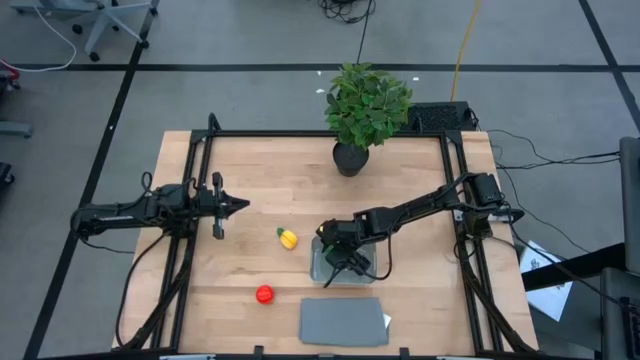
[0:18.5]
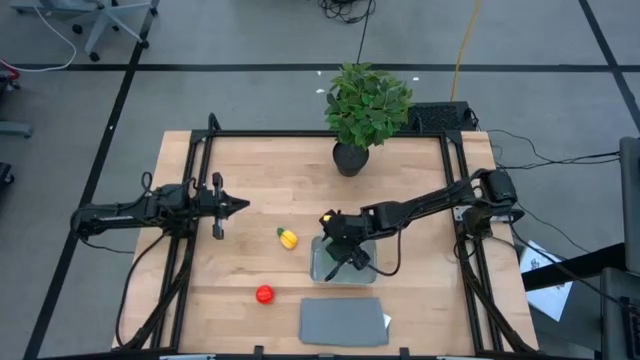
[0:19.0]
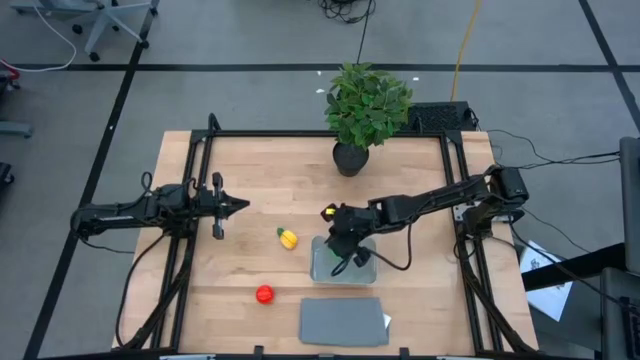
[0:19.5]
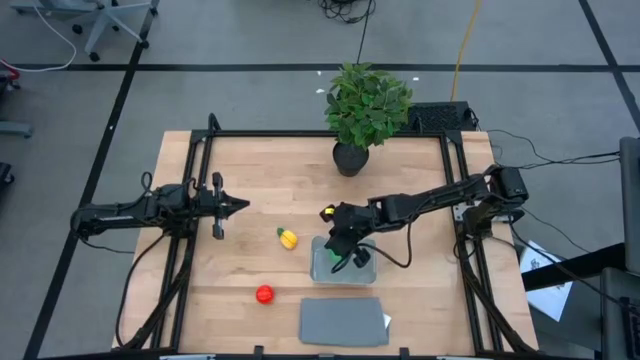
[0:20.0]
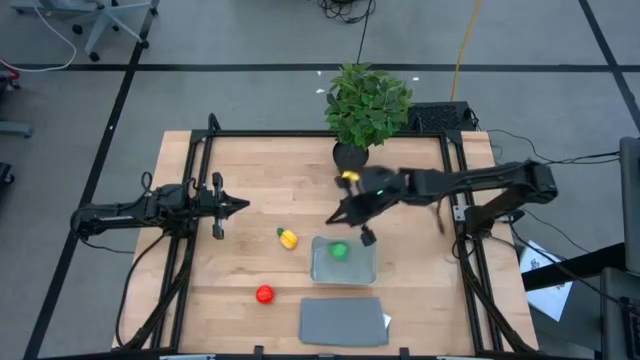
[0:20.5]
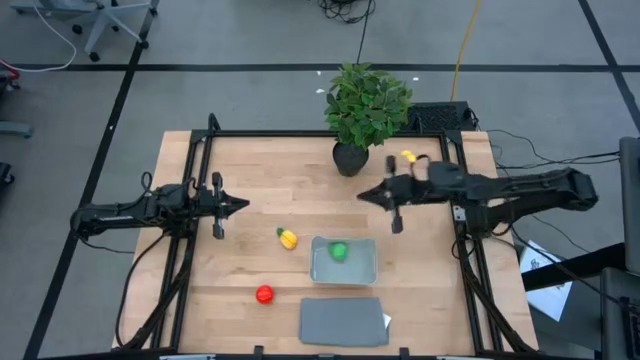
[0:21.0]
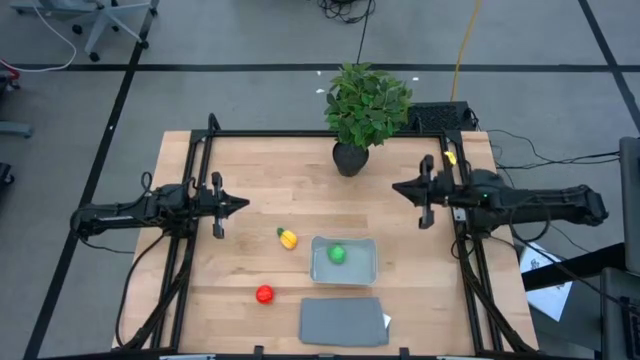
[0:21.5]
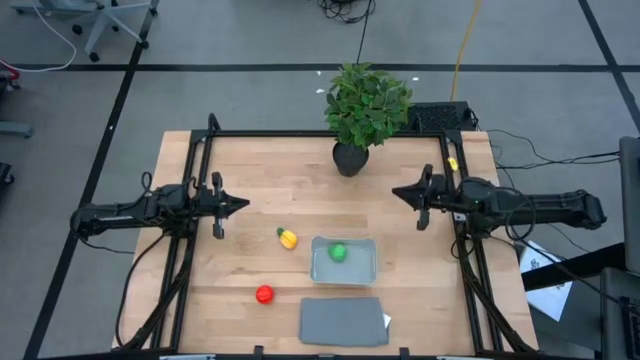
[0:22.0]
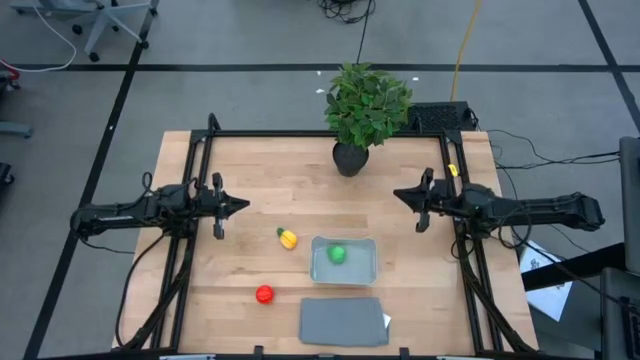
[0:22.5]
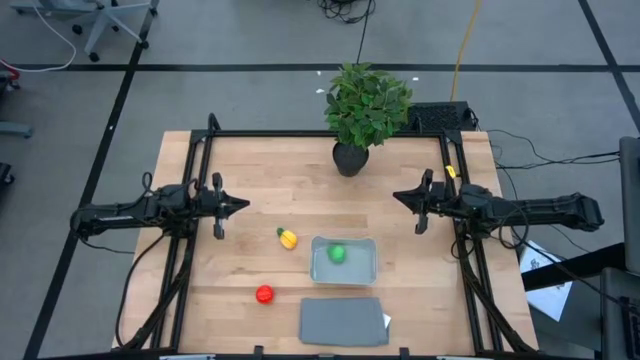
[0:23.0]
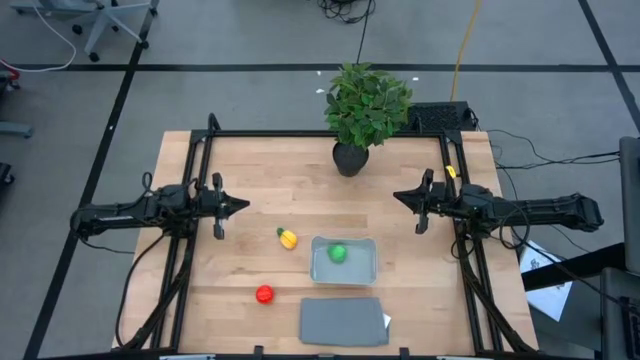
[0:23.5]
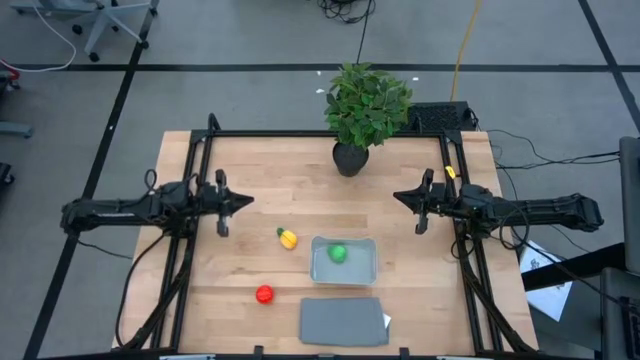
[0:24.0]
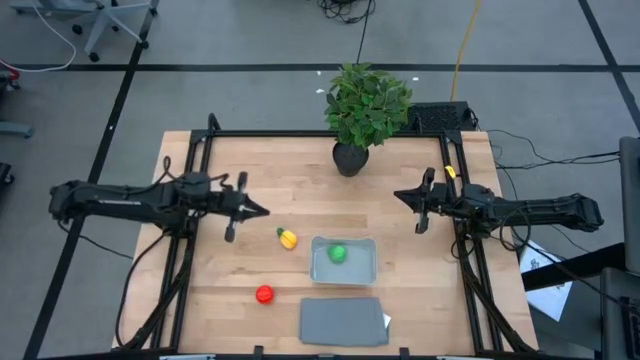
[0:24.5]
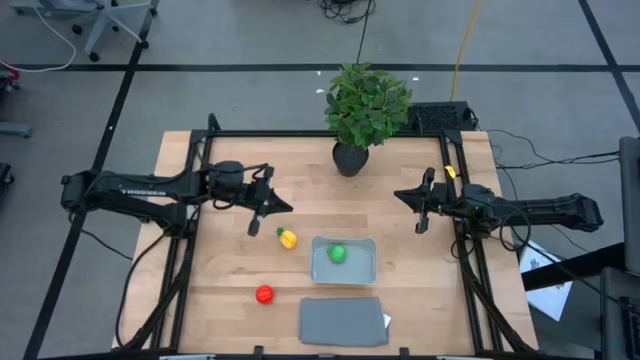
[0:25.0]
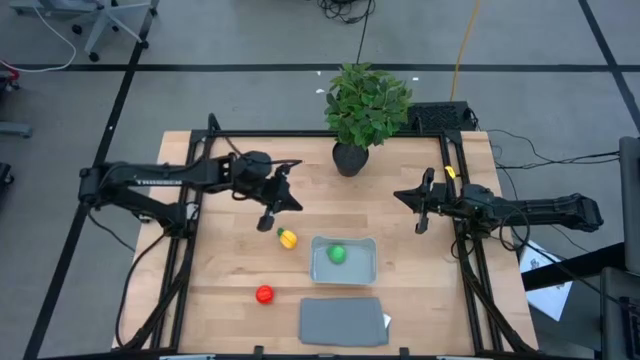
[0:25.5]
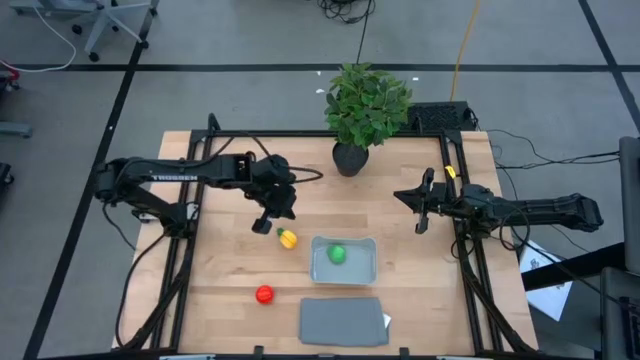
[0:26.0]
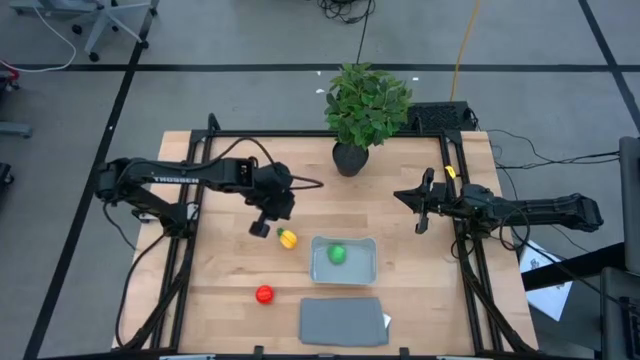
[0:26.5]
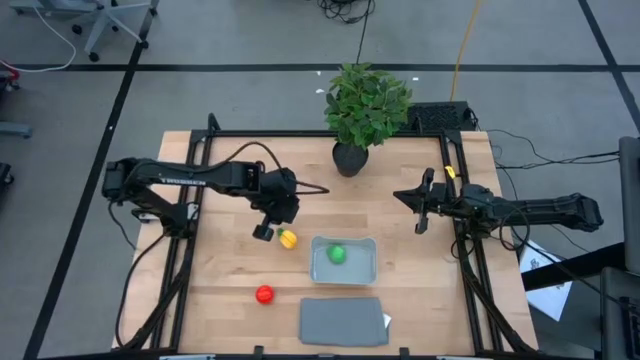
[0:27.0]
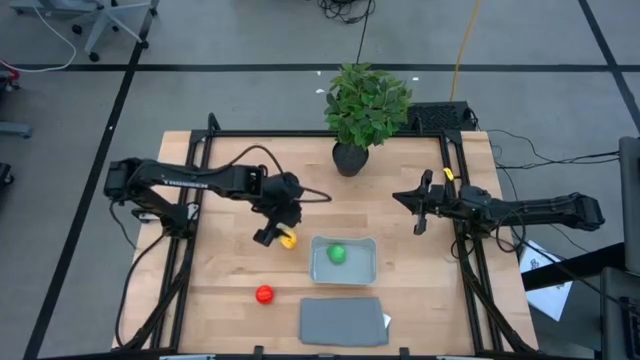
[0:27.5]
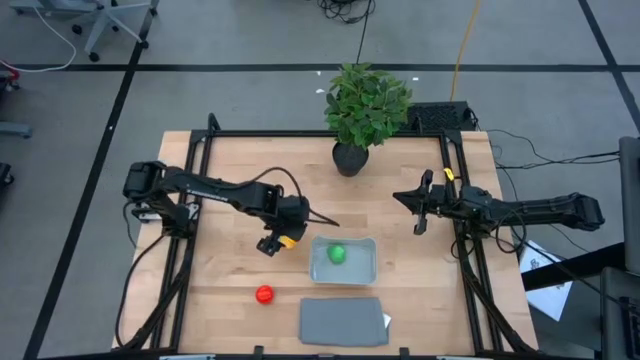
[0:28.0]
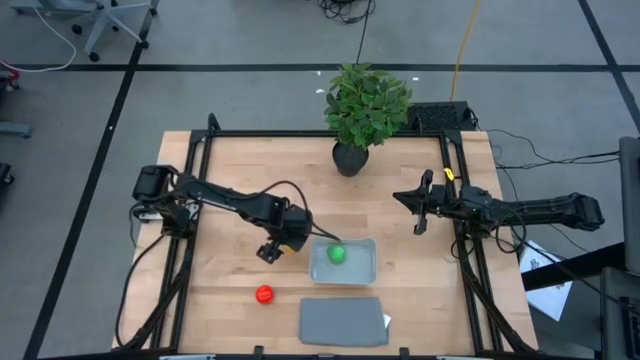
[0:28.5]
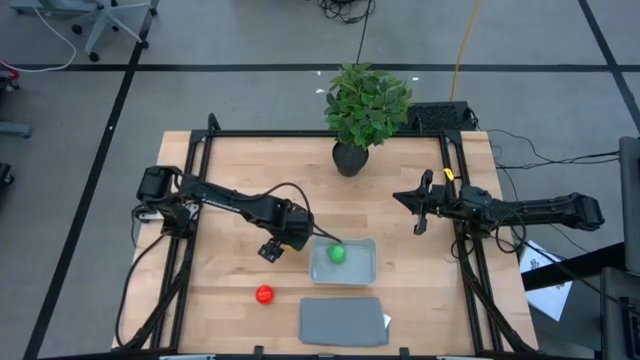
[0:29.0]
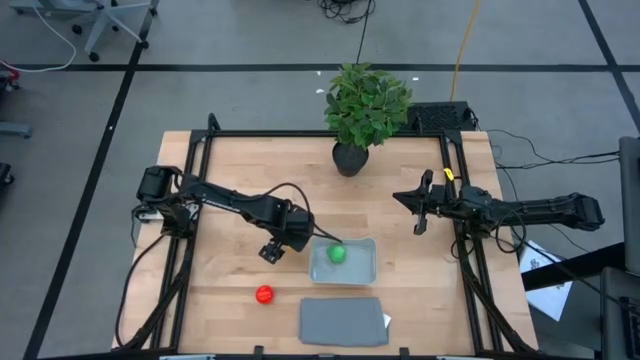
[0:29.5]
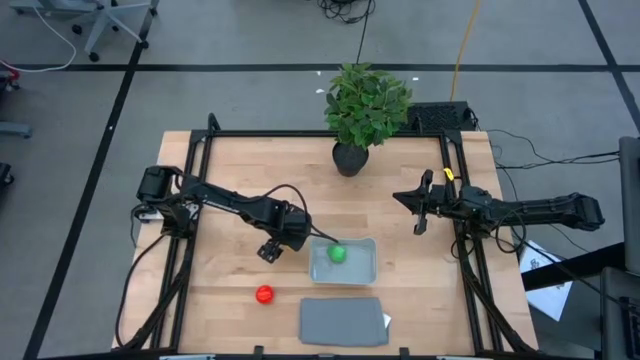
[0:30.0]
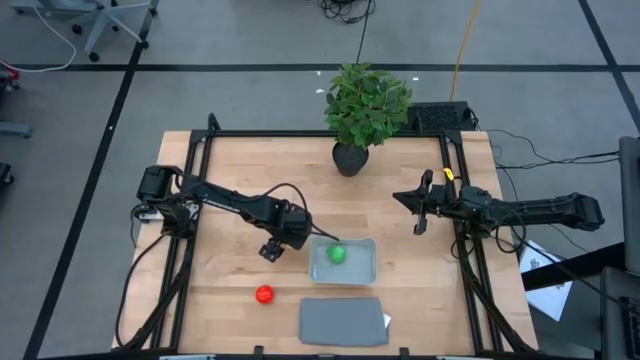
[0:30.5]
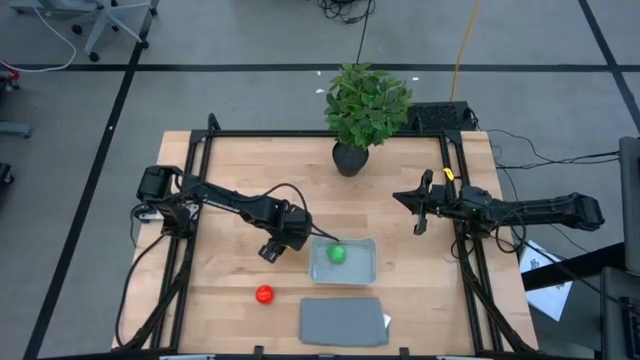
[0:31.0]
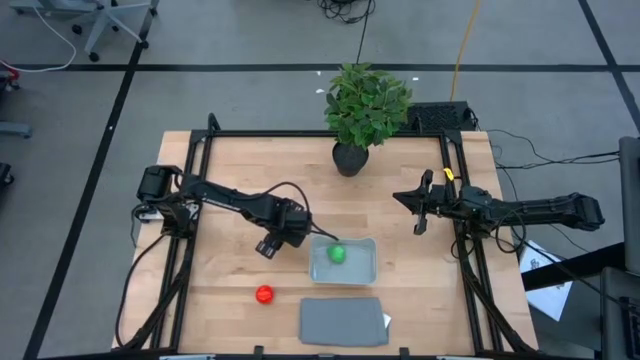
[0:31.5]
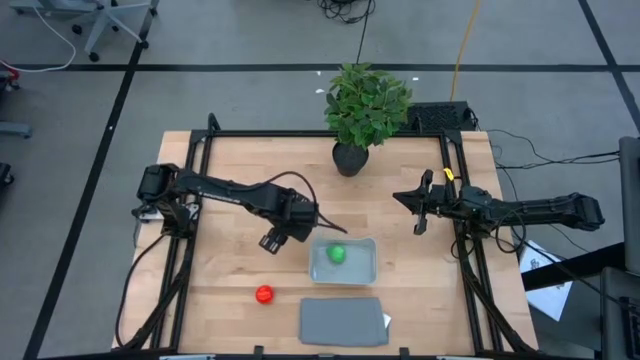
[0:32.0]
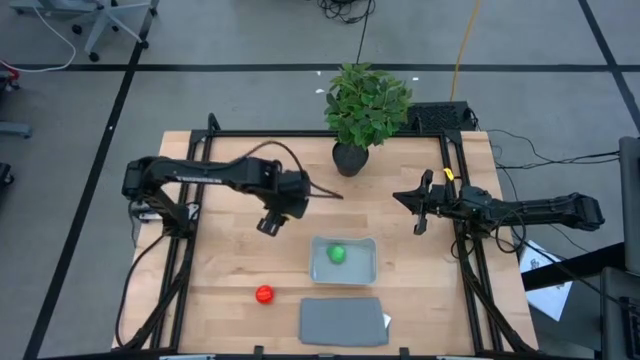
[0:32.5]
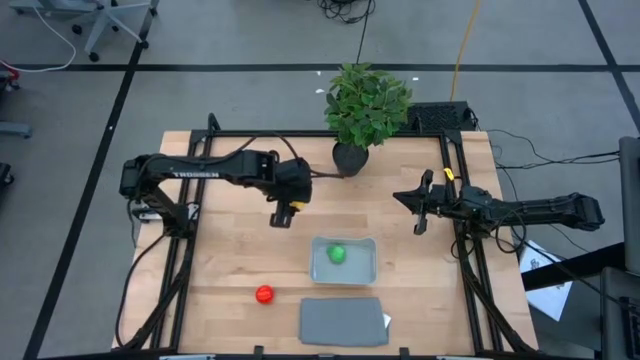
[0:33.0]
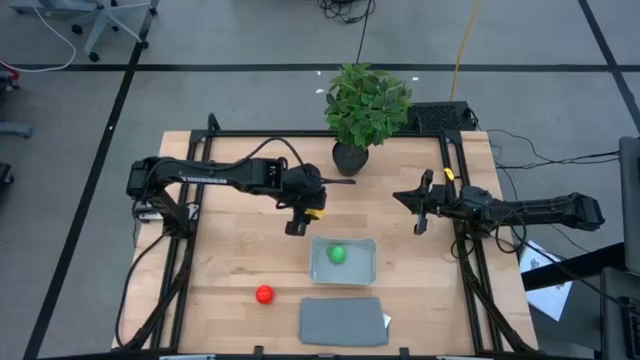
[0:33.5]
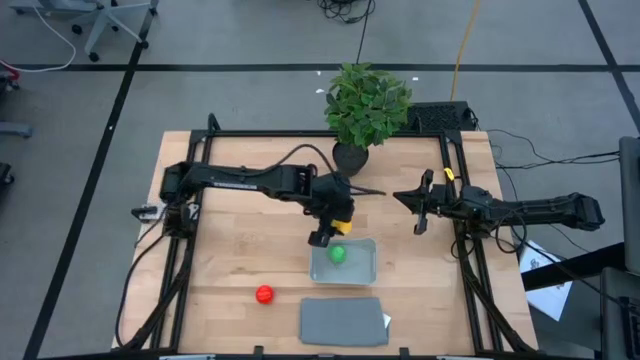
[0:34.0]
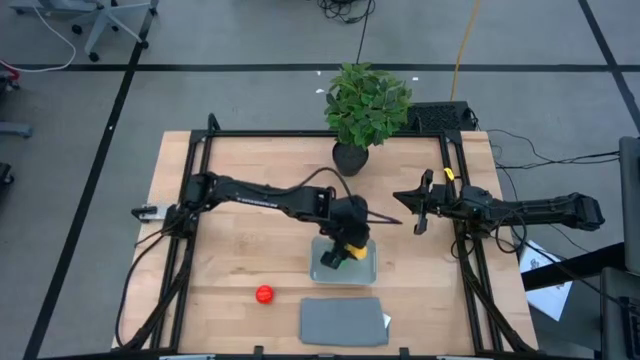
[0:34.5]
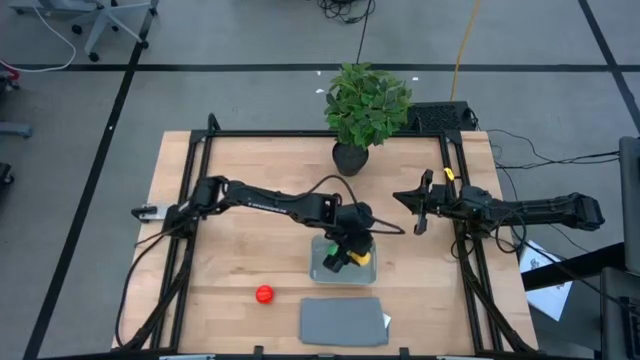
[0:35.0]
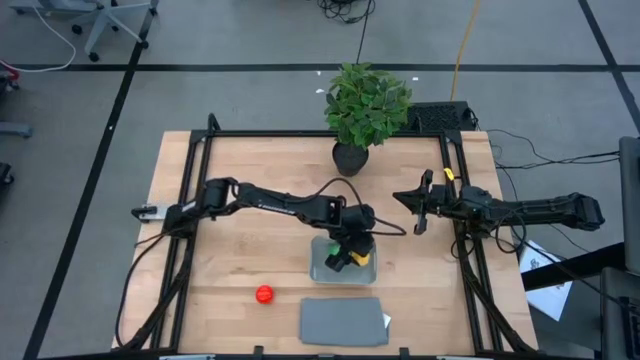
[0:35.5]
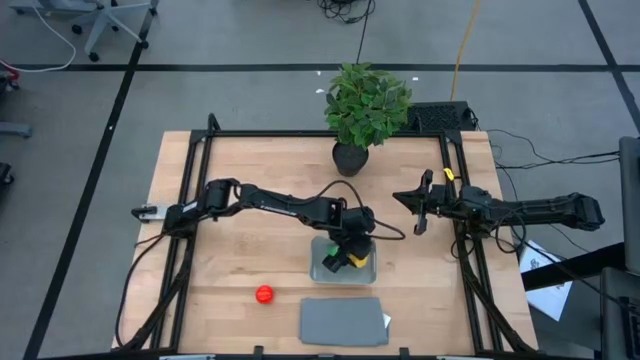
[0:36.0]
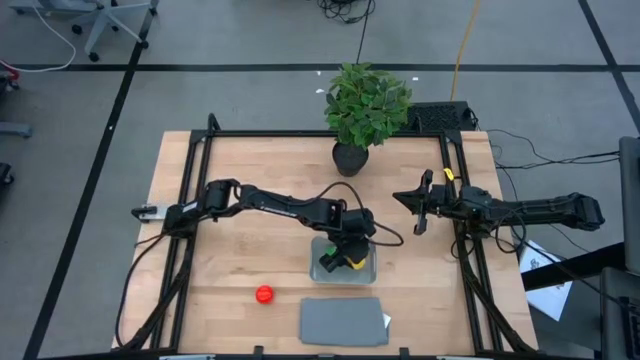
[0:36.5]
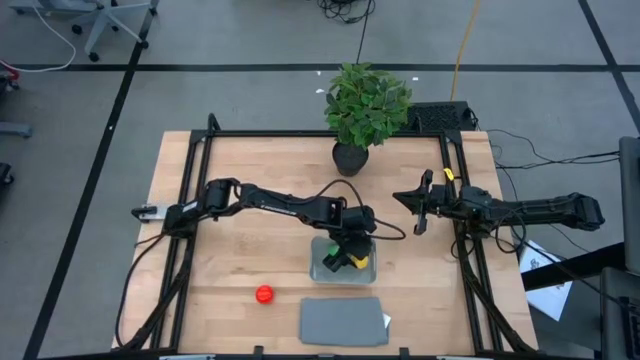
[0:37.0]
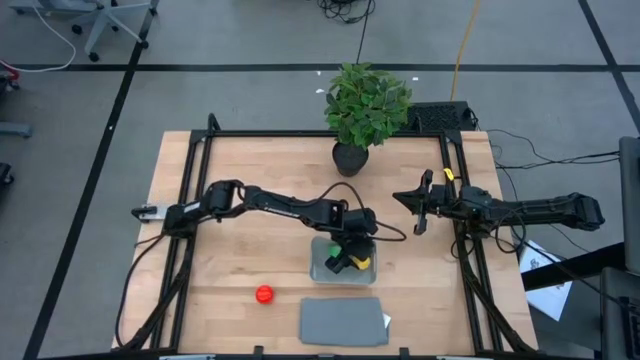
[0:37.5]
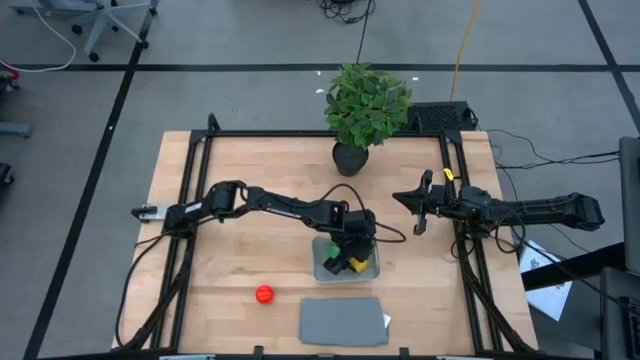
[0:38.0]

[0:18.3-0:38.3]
Task: Pick and placing Produce into tupperware
Put the pineapple into the bin

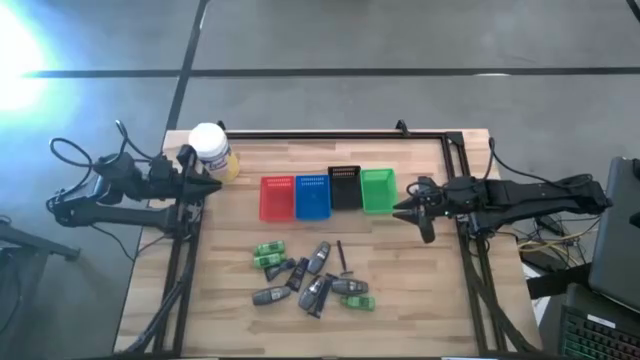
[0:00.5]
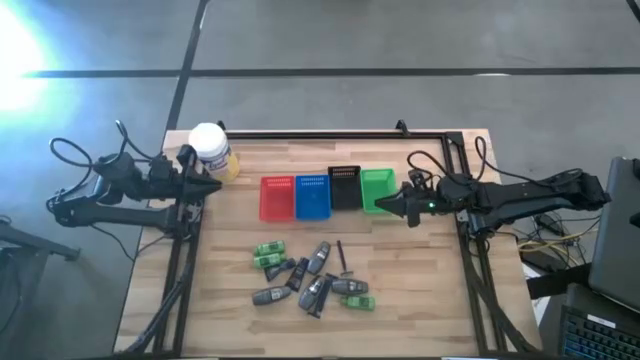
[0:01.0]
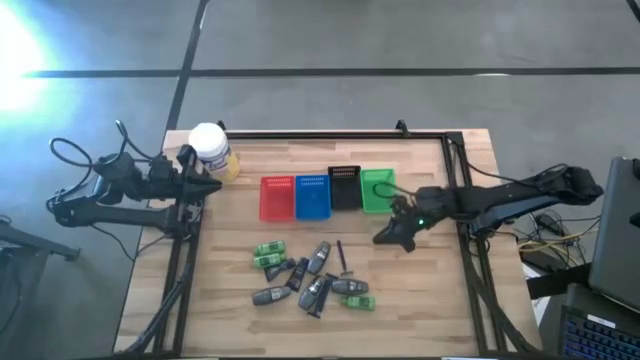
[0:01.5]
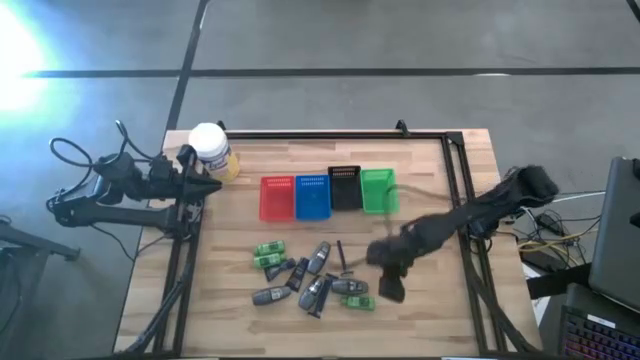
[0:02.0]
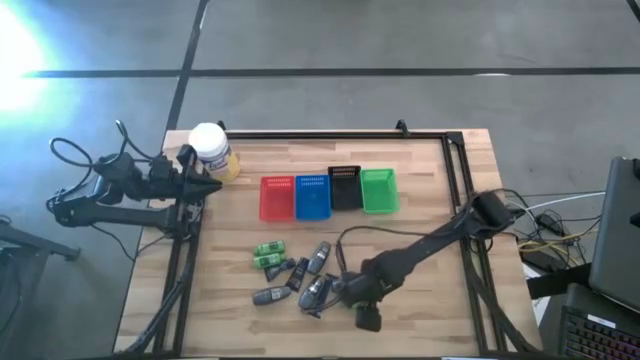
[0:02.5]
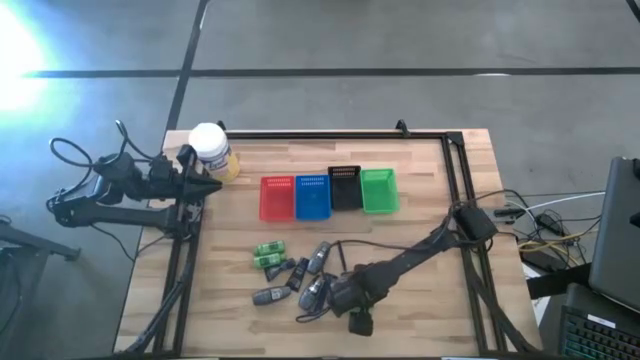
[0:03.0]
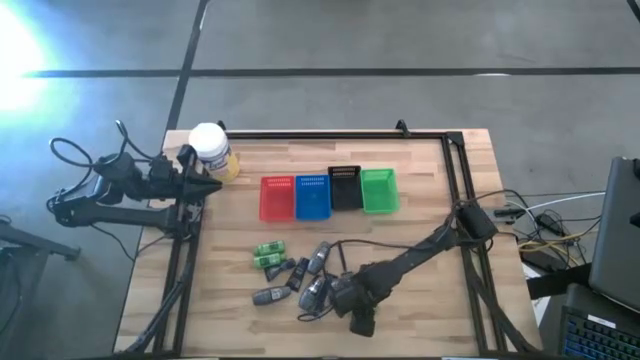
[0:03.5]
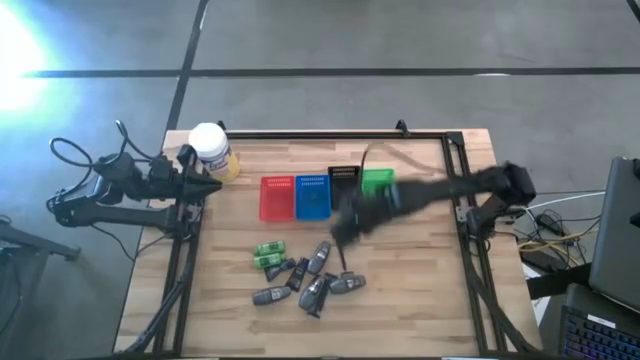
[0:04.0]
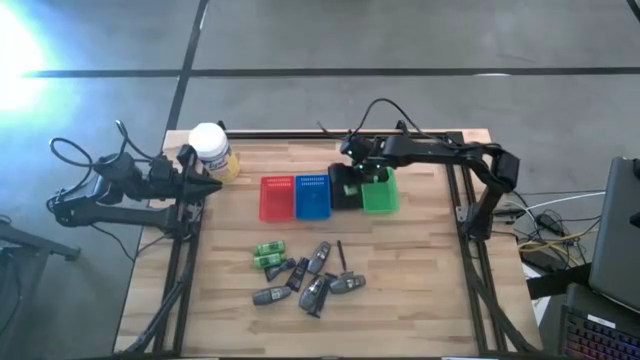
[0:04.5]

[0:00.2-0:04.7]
Task: Pick & Place Travel size toiletries
Put the green shampoo into the black bin
